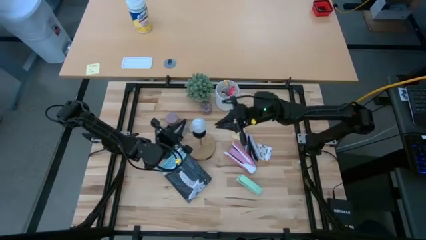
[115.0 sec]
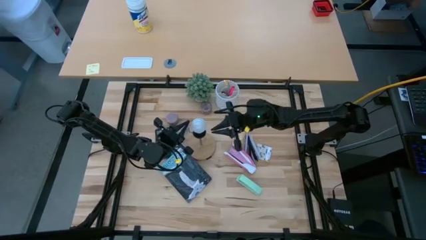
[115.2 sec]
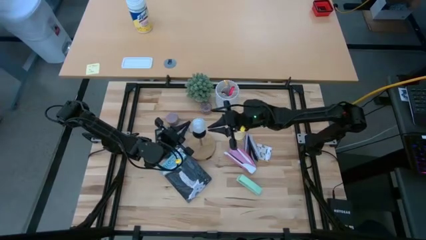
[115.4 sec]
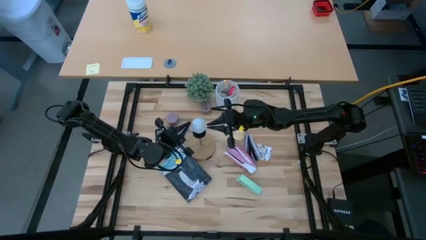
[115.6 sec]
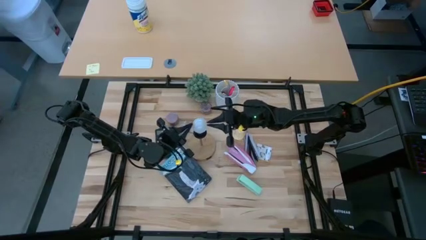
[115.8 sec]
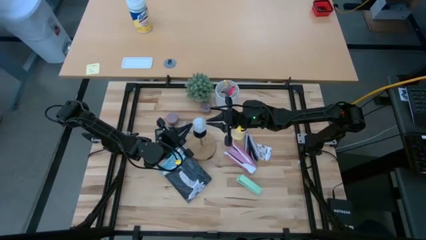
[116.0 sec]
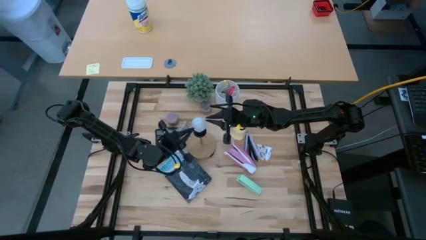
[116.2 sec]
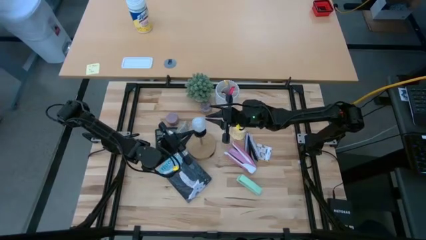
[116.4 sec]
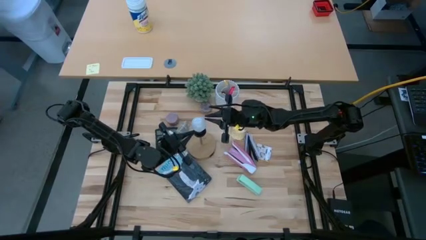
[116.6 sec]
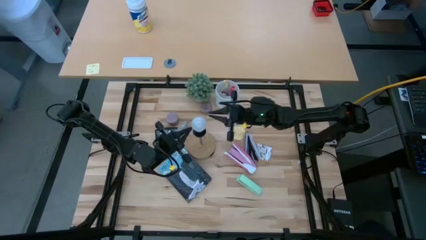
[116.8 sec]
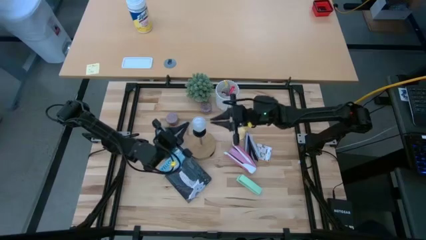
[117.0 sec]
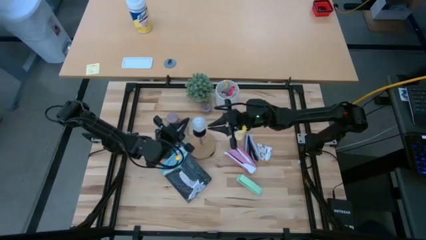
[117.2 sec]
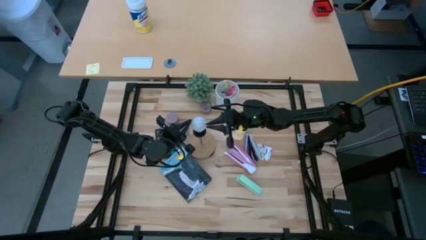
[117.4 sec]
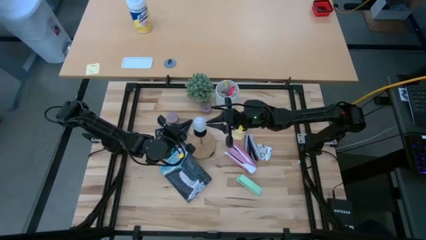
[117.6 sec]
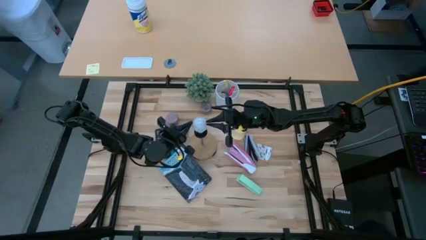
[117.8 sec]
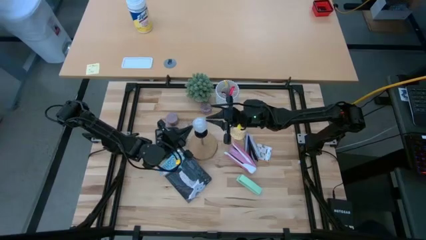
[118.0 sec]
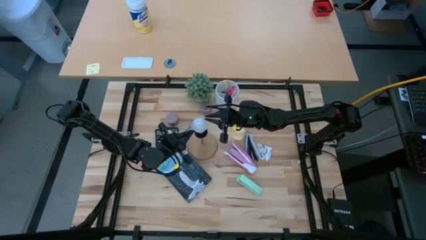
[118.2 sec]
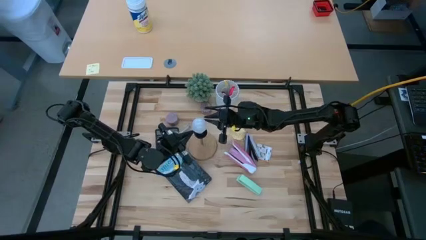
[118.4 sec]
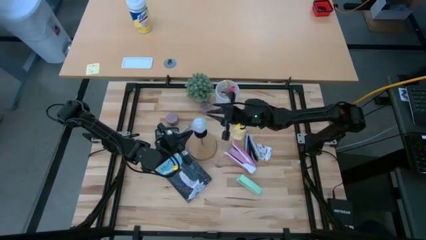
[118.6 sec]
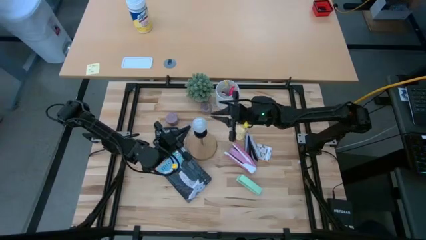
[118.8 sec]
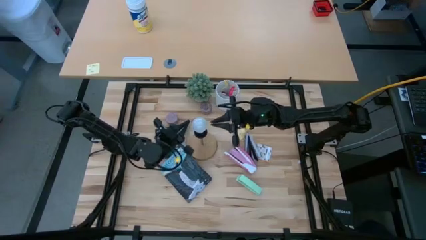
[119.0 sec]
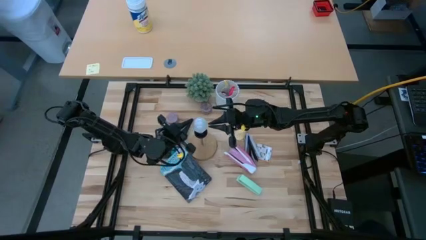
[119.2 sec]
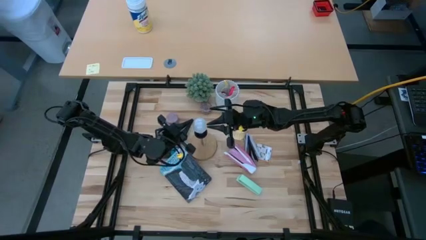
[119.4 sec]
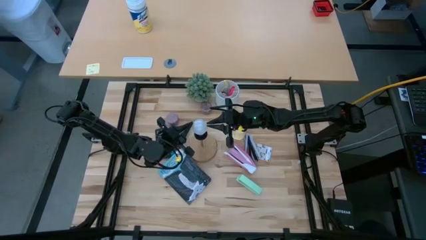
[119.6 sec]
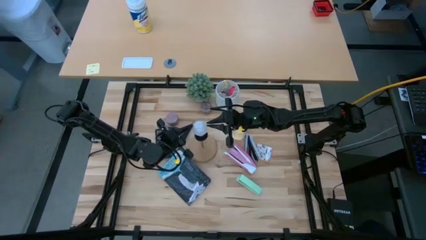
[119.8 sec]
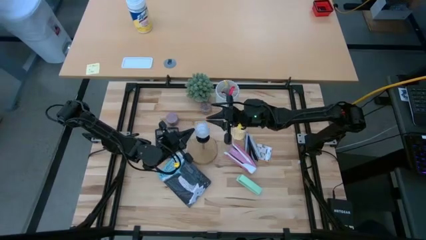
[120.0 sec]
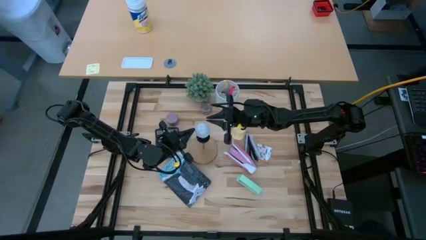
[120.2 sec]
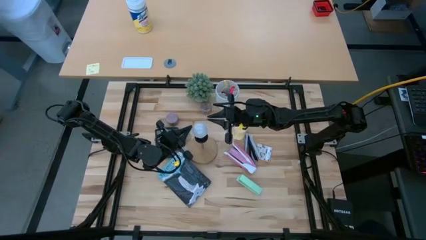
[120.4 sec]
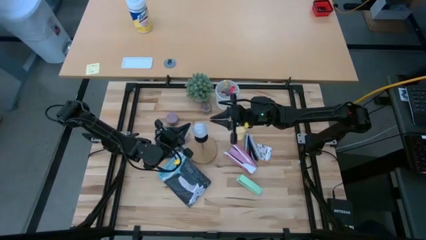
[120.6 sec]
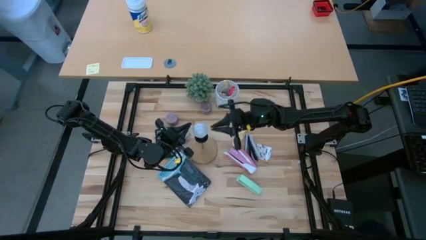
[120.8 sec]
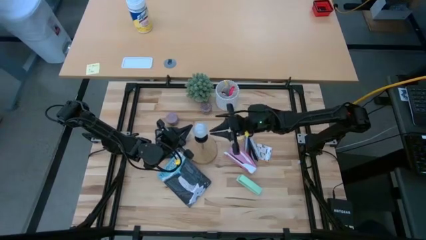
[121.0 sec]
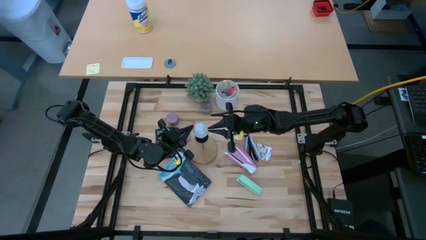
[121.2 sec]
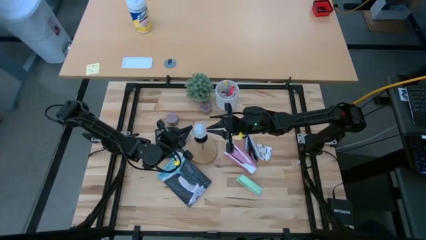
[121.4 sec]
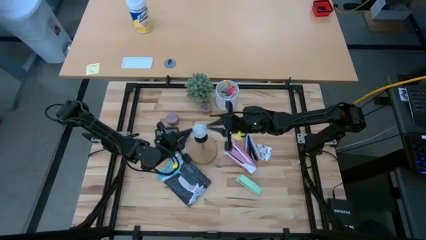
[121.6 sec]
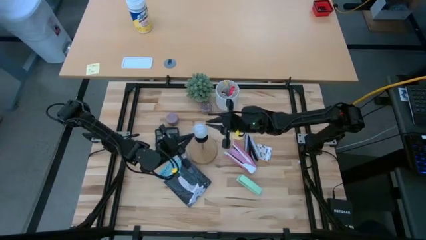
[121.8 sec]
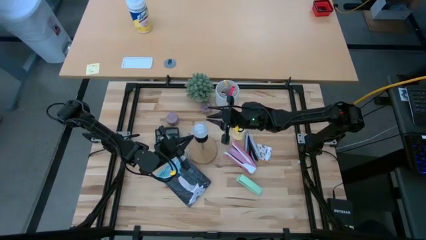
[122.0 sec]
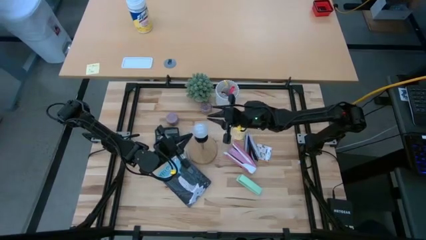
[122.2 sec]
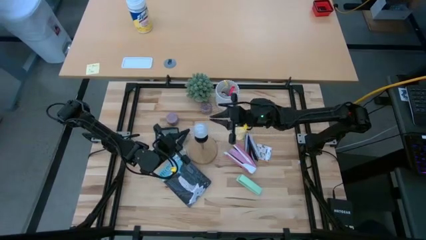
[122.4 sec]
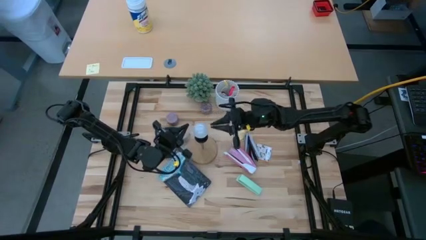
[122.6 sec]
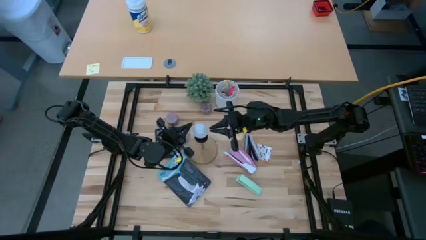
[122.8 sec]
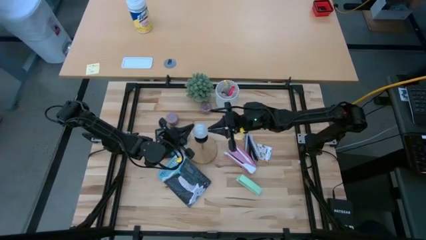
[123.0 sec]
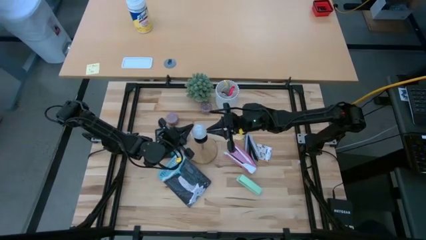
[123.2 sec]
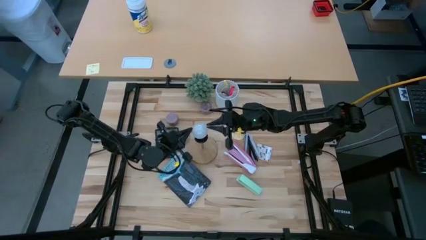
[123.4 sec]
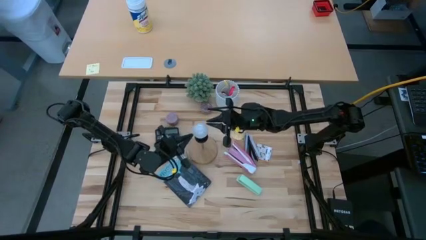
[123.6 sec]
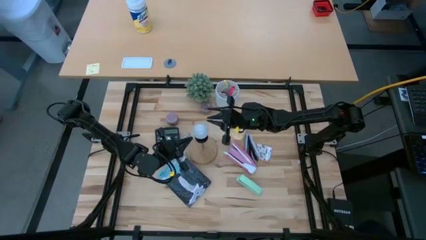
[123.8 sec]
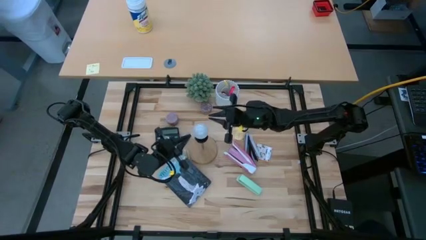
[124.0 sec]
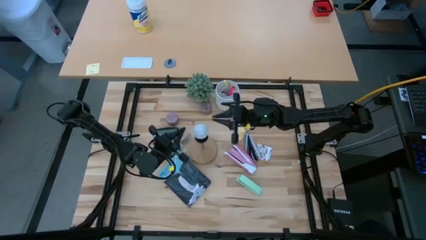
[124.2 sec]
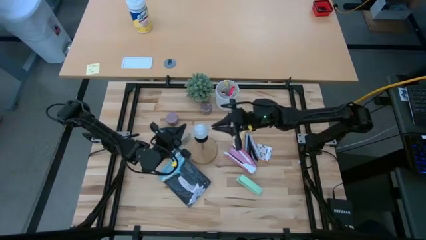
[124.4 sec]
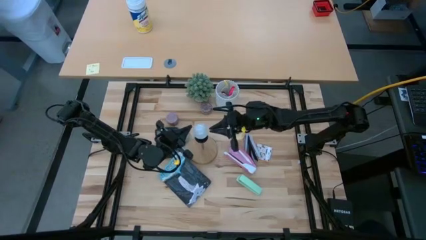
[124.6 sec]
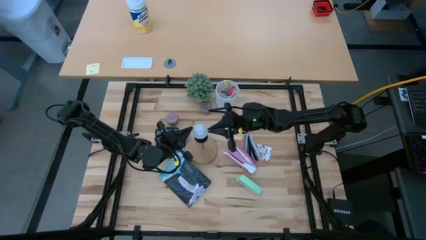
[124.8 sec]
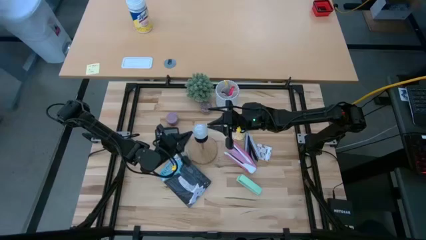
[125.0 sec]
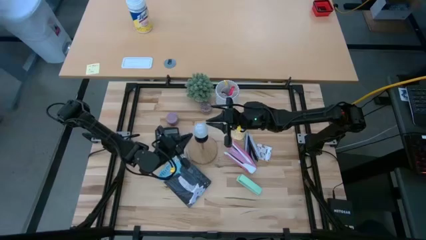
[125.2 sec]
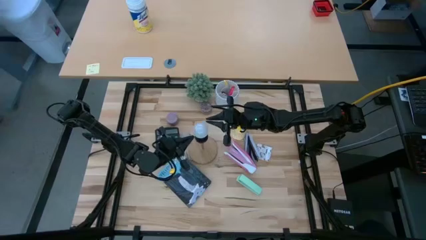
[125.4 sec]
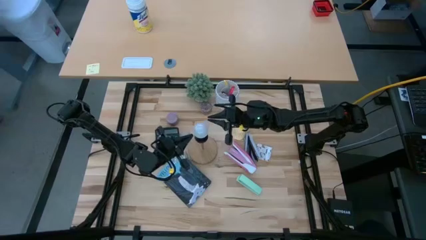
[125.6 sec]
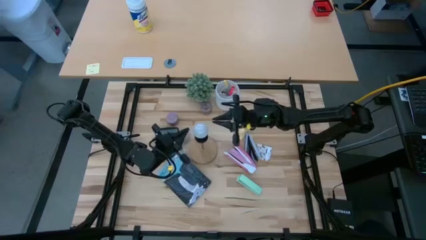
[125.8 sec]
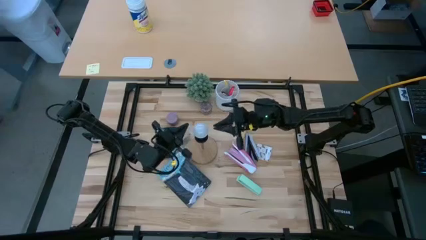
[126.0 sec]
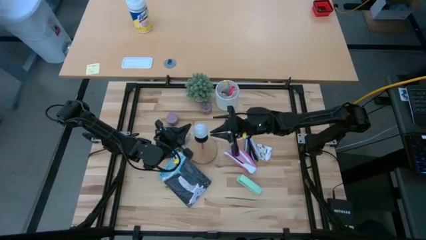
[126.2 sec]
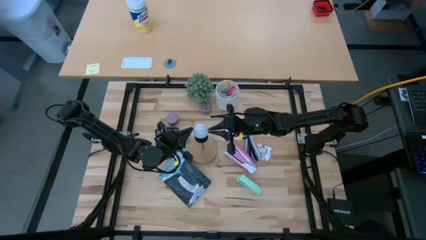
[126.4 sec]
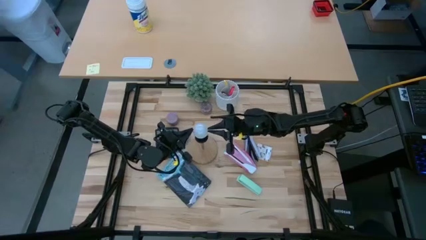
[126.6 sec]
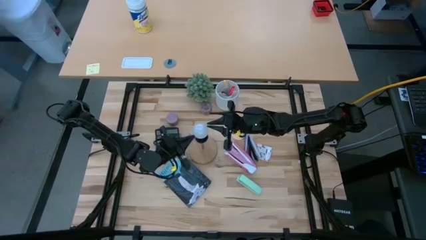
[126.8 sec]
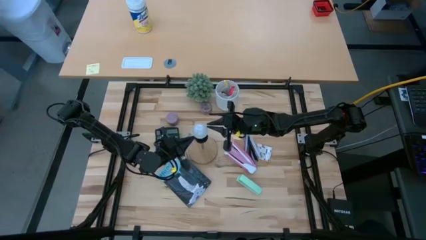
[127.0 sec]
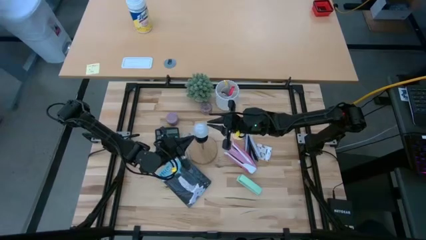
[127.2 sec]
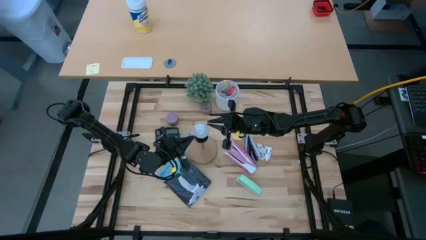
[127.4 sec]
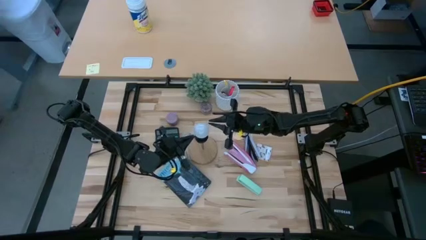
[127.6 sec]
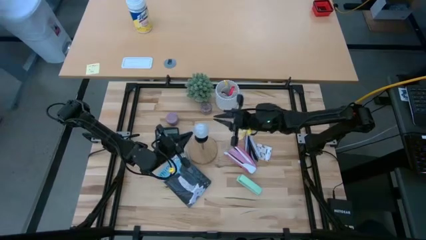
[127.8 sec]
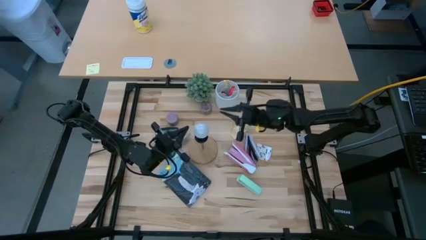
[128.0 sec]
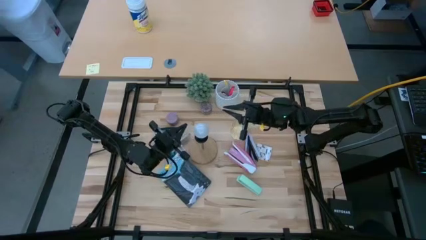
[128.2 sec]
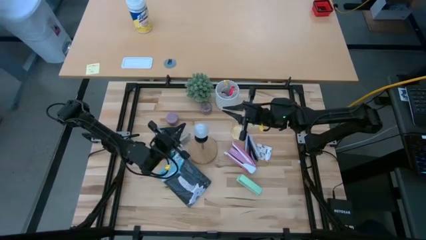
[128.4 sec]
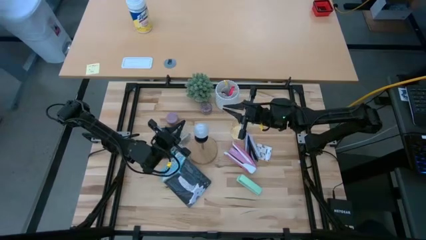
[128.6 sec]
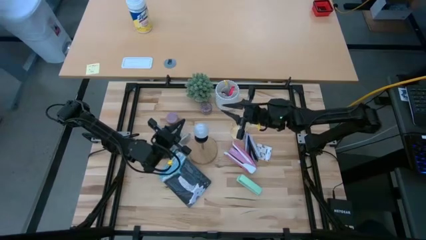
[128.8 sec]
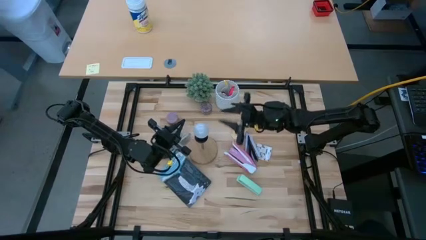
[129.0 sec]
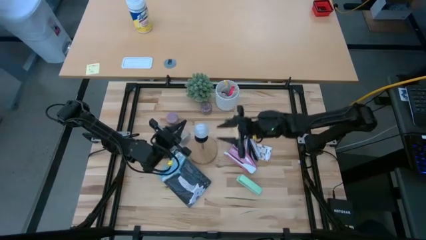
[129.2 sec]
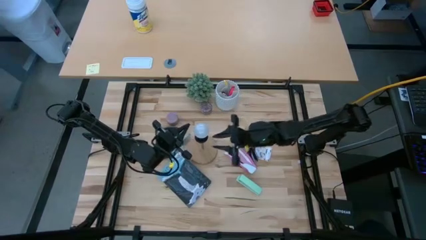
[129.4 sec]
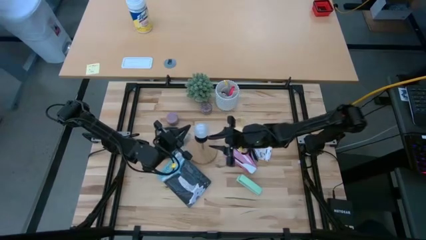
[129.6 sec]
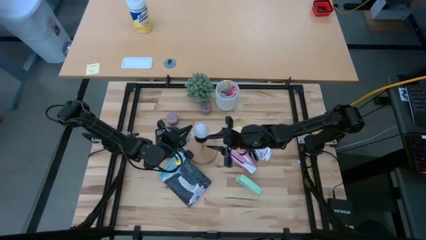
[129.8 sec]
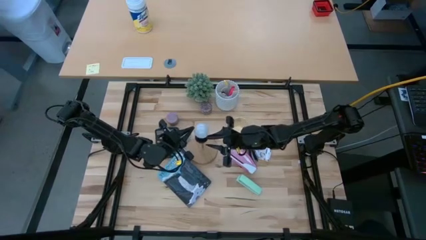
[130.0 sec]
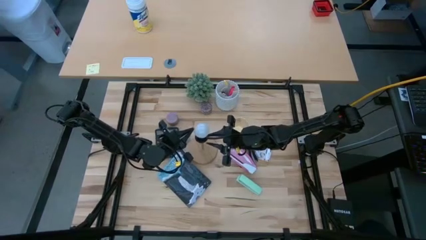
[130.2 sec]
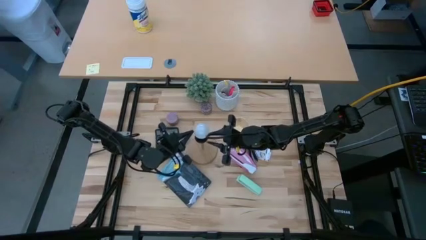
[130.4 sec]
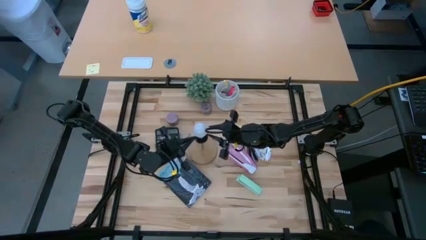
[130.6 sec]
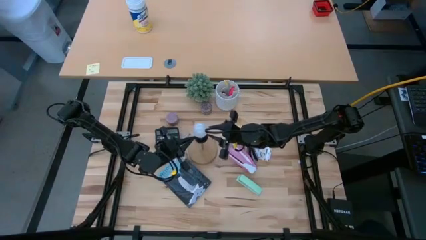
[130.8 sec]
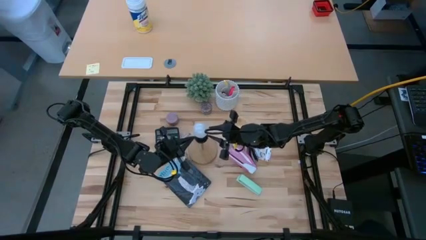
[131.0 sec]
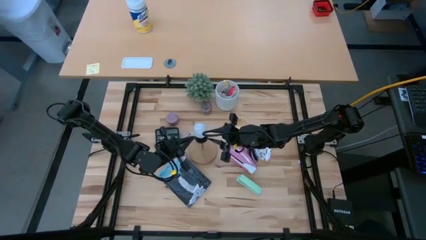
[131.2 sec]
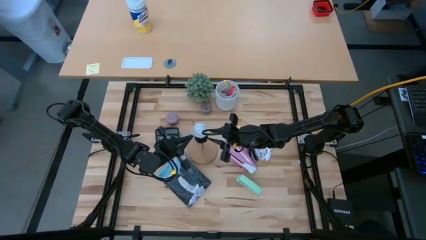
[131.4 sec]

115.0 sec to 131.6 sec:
Task: Screw lightbulb
Remove the lightbulb from the lamp
